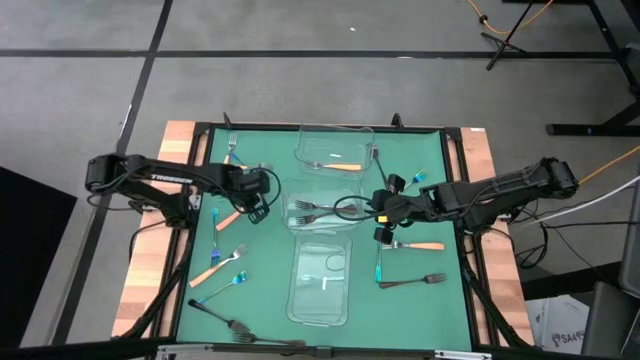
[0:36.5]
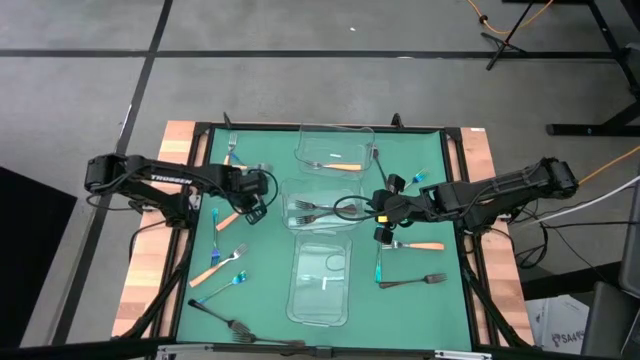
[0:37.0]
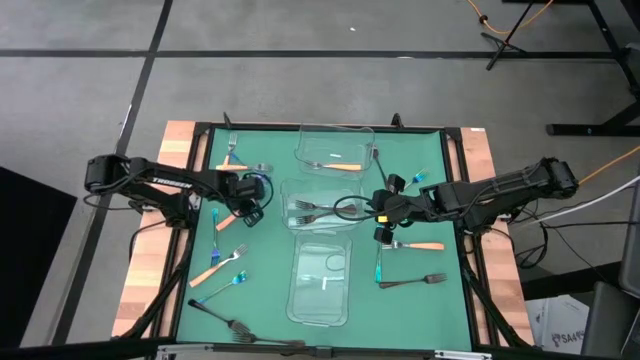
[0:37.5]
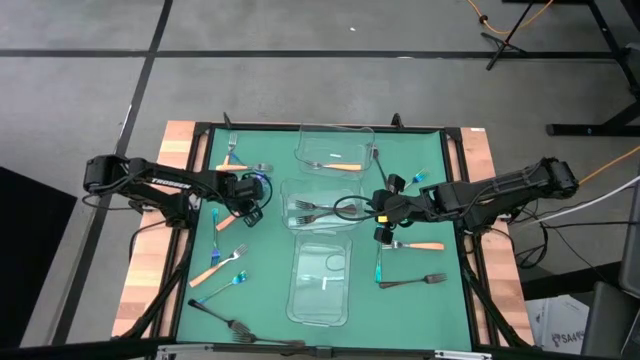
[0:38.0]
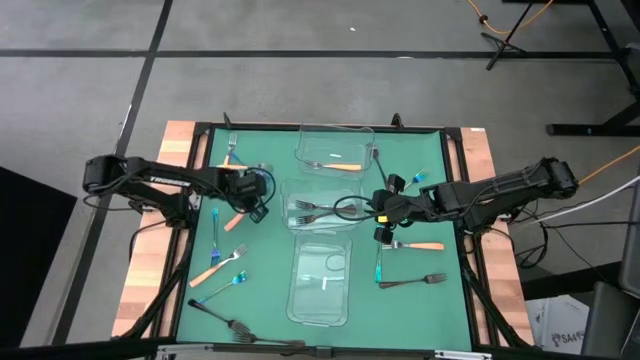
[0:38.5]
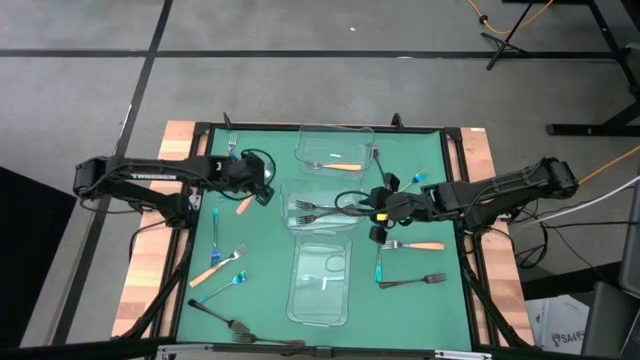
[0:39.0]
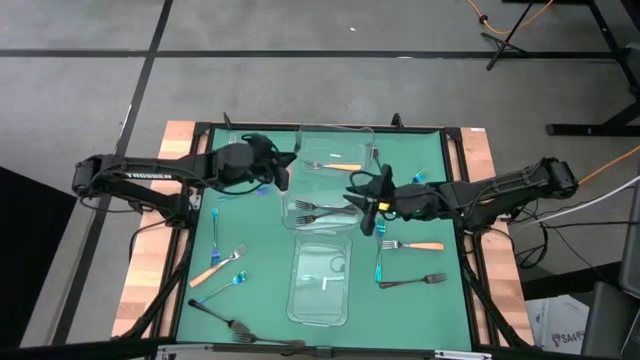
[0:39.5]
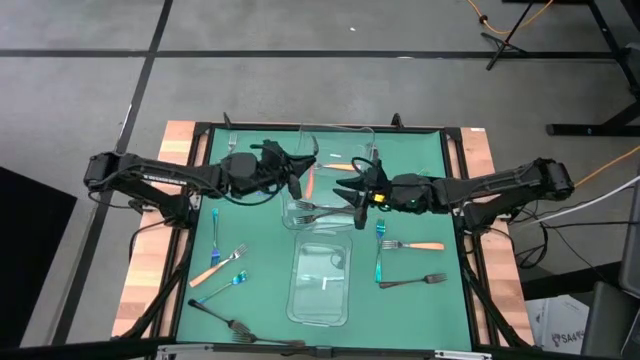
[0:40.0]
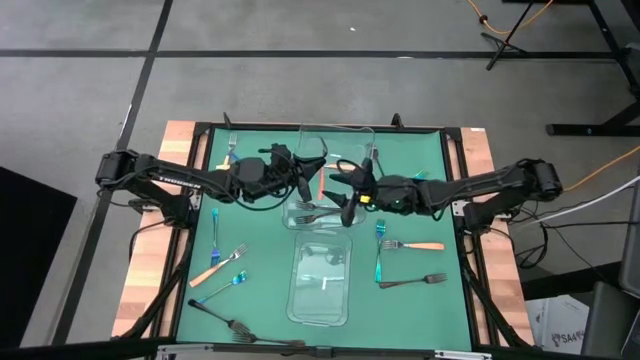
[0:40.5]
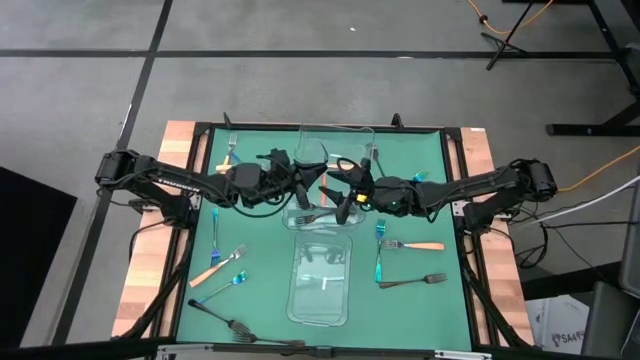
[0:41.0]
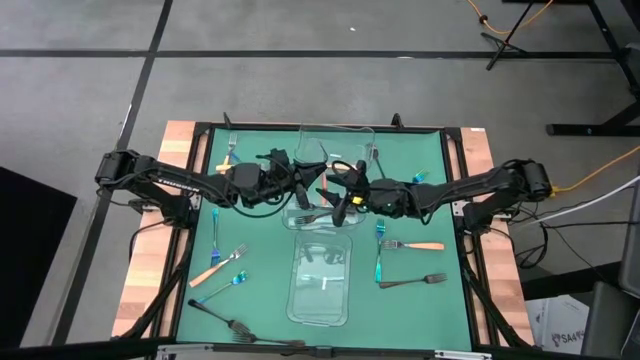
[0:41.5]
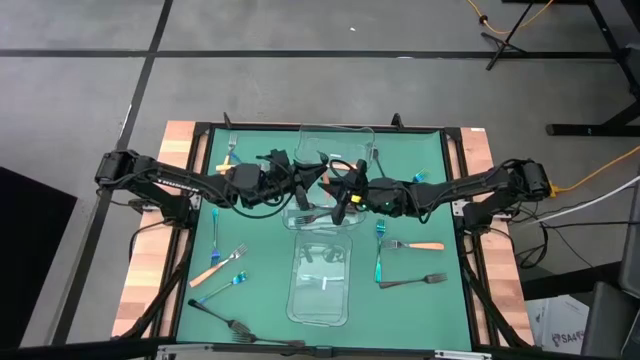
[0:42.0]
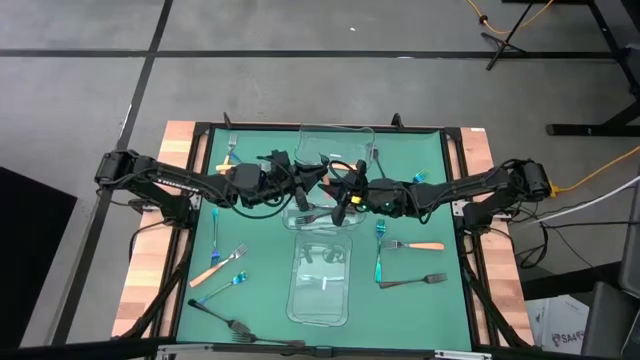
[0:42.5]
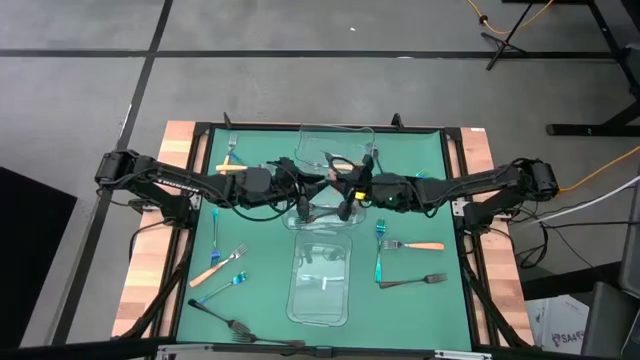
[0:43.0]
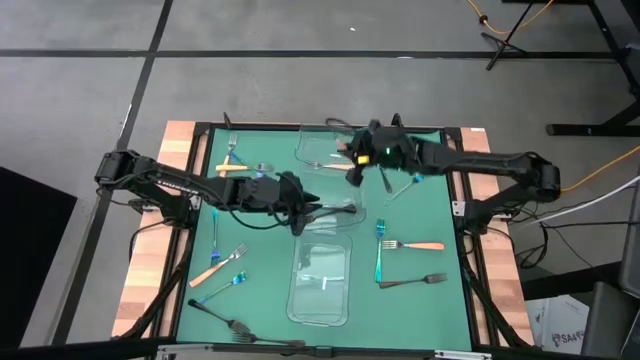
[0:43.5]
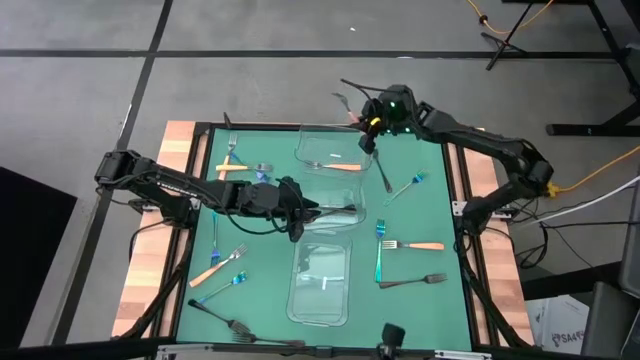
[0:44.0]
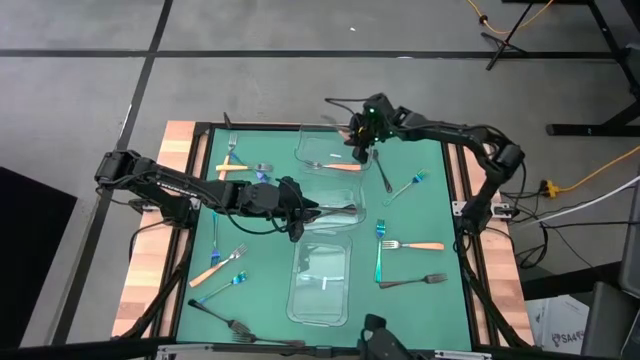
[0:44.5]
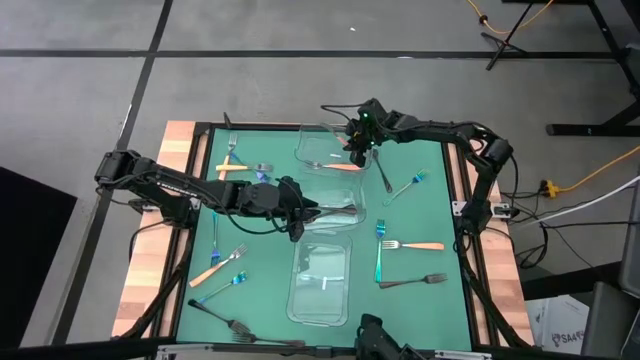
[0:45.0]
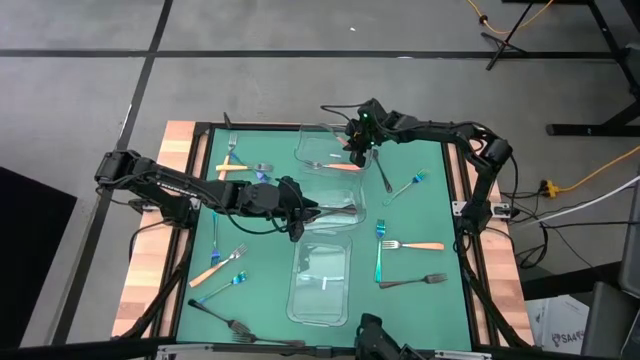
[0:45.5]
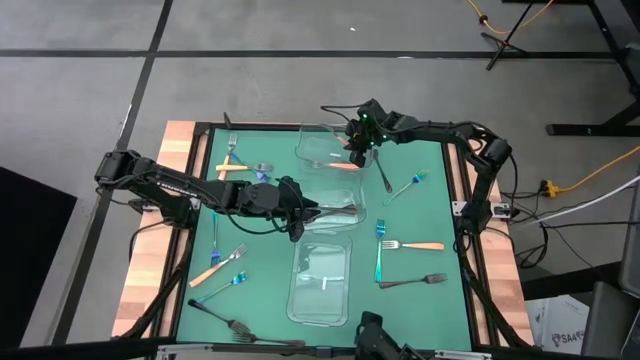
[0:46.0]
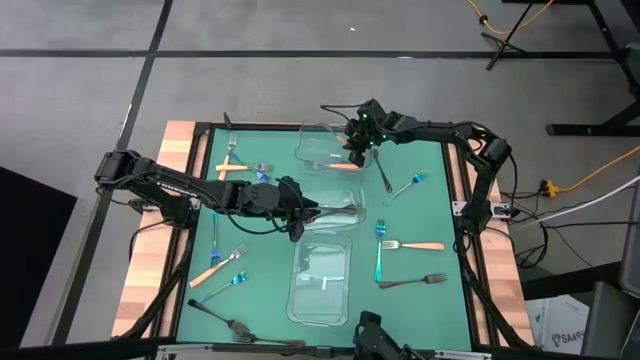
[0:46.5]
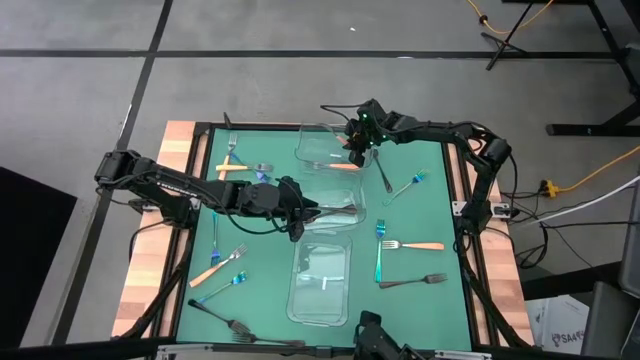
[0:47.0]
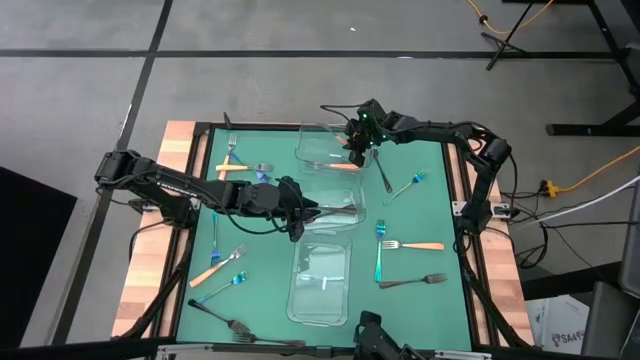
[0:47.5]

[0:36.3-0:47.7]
Task: Sort silverware by color (type)
Put the yellow fork into the top transparent bin

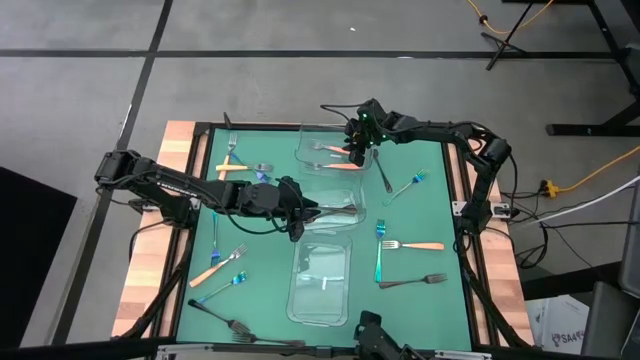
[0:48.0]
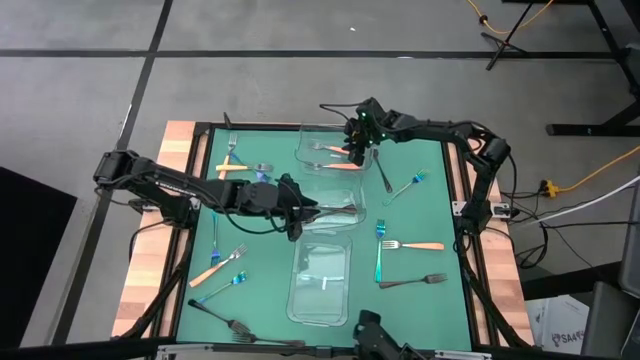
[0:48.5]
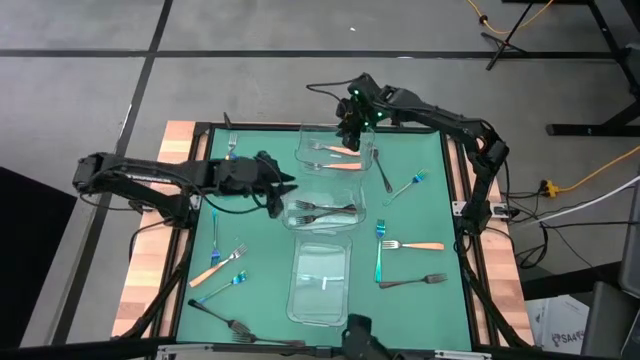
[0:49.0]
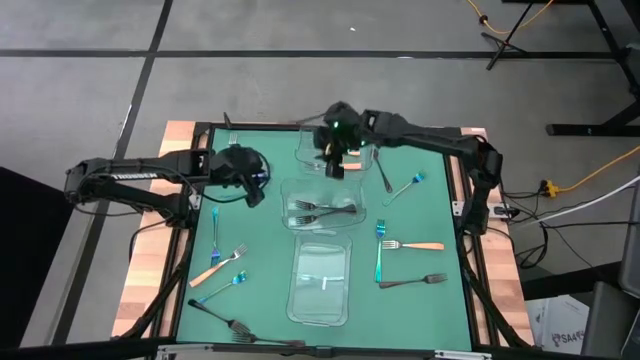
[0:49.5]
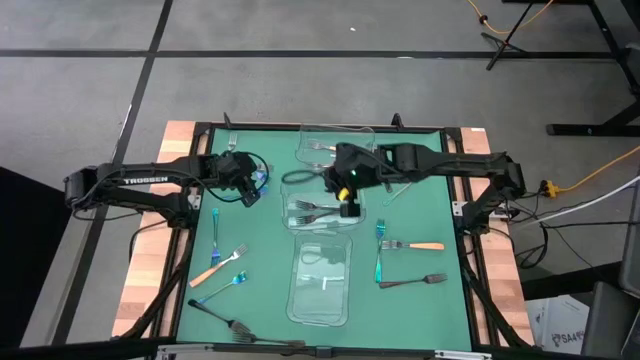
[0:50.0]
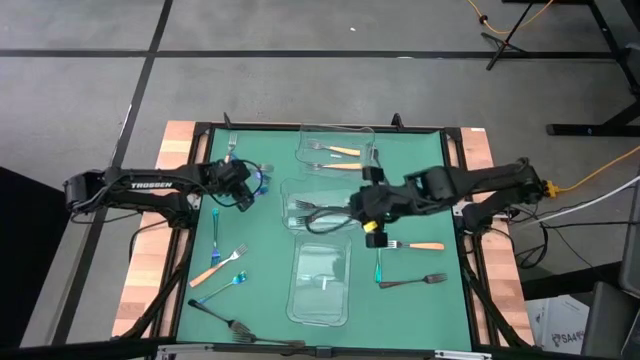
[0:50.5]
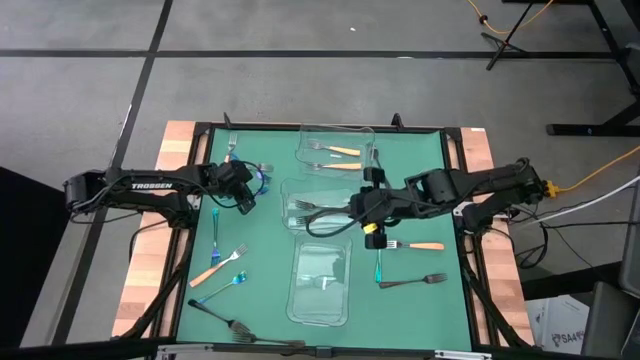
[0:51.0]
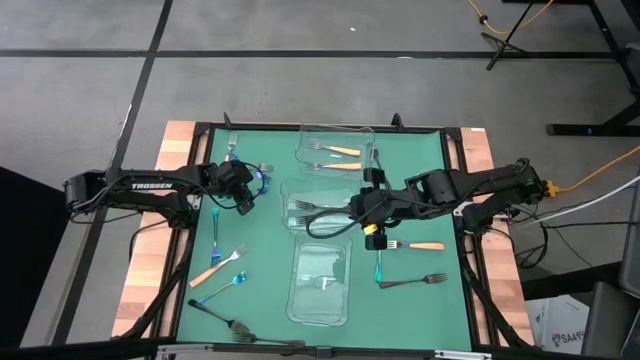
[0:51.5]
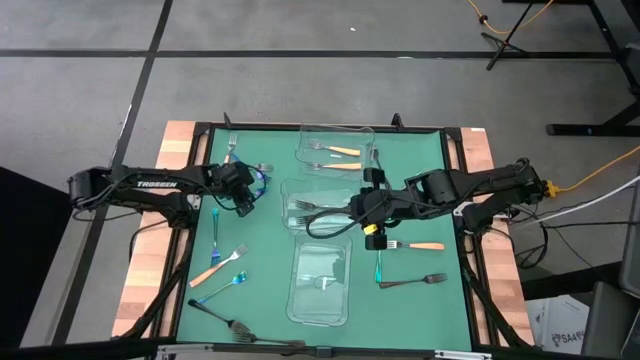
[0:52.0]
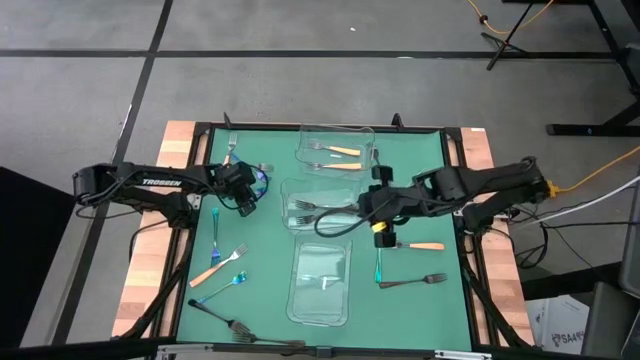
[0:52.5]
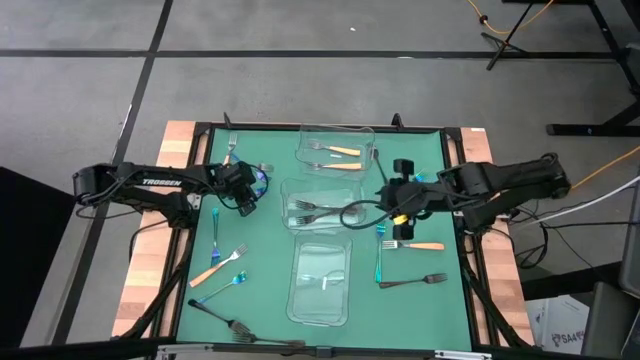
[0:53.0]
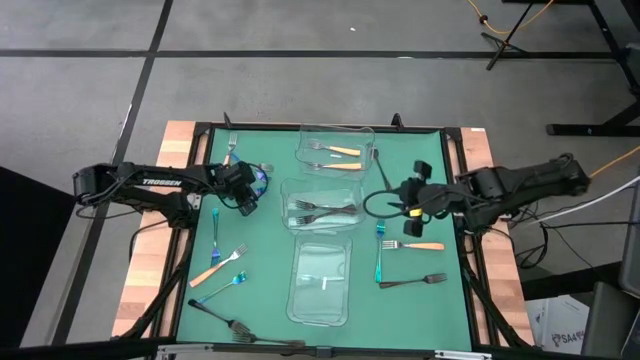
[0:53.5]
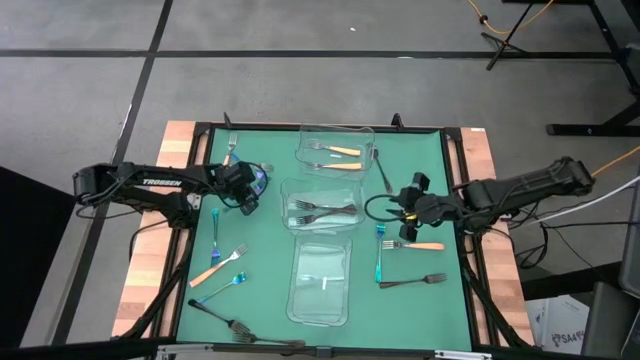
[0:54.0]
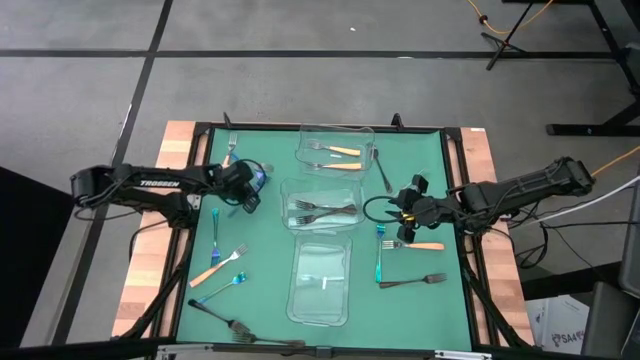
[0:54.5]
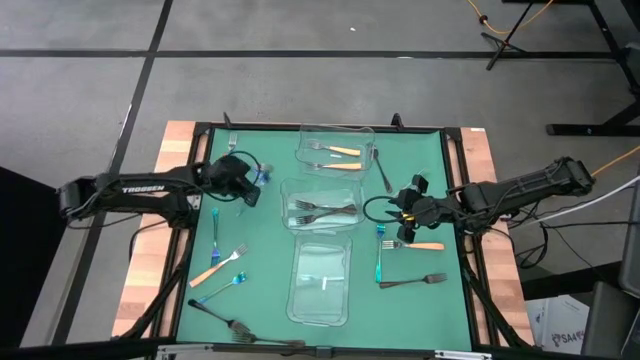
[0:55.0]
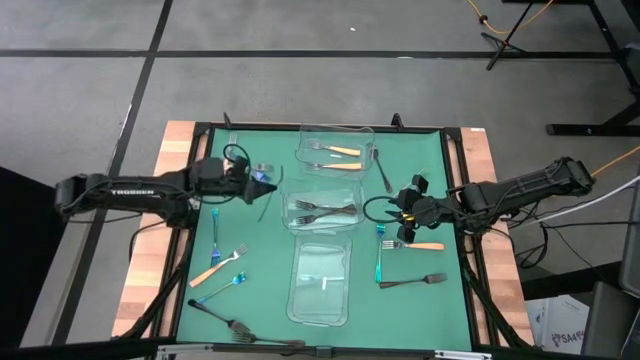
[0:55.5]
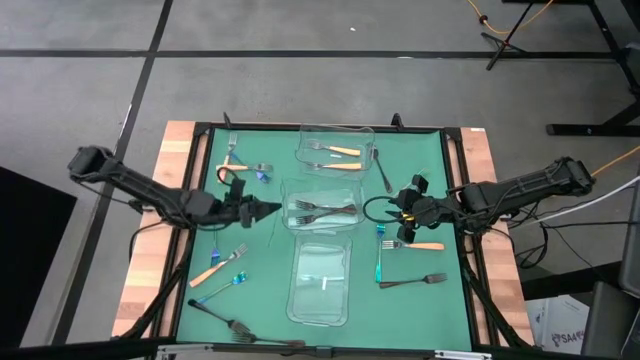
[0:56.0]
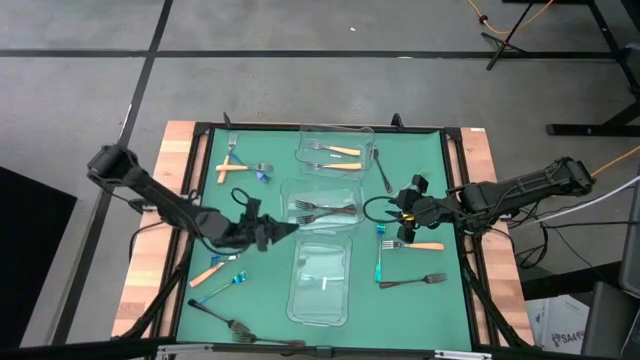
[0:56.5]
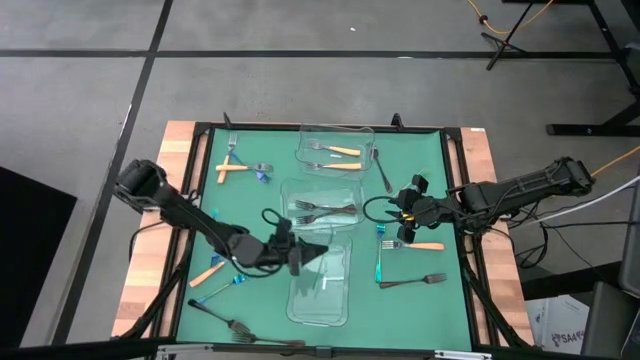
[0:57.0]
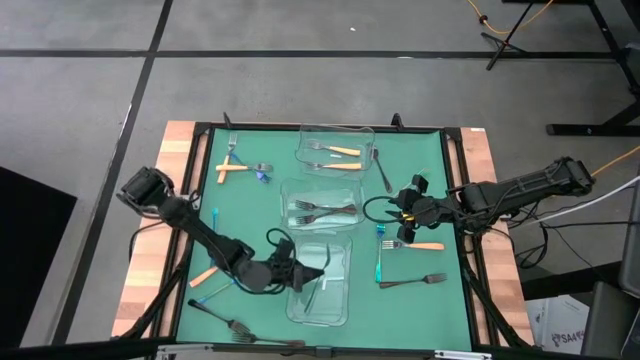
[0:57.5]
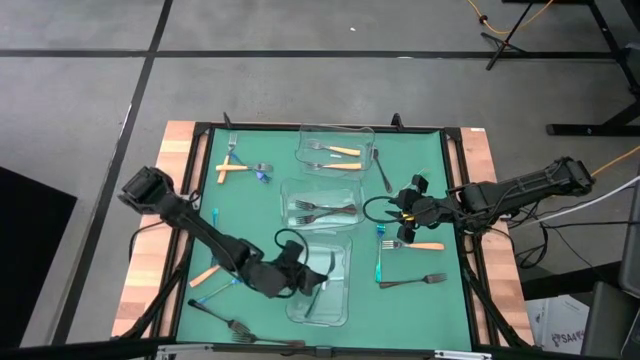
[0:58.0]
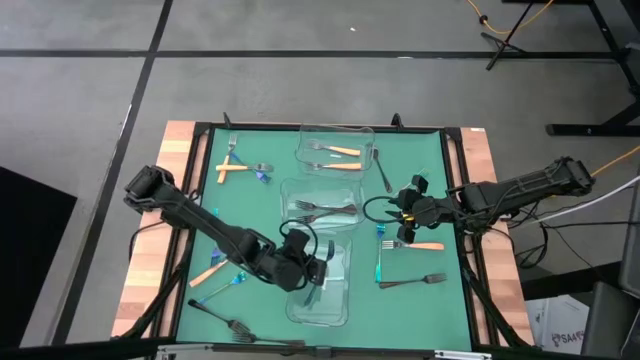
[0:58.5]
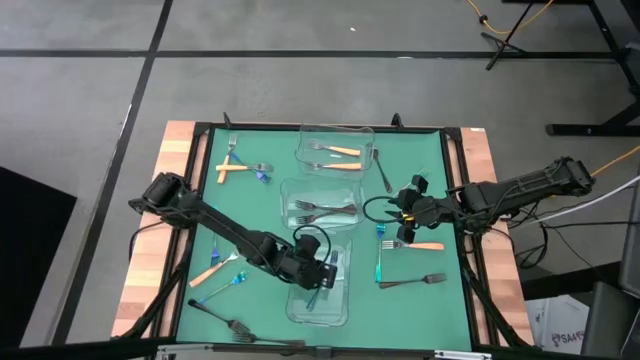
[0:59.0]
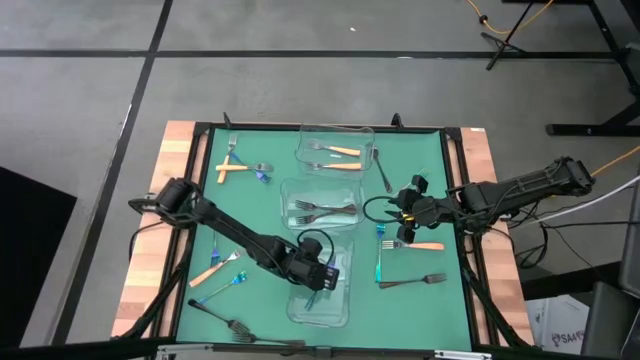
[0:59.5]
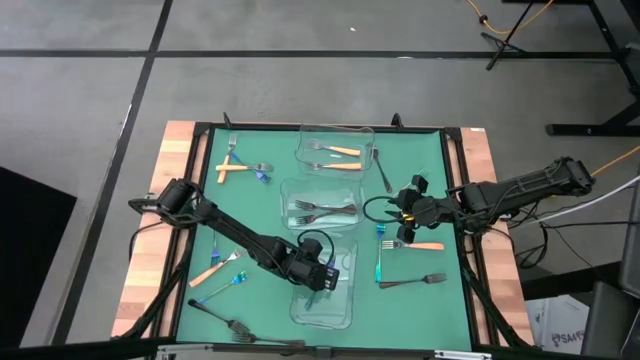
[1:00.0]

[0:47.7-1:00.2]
Put the blue fork into the bottom transparent bin
